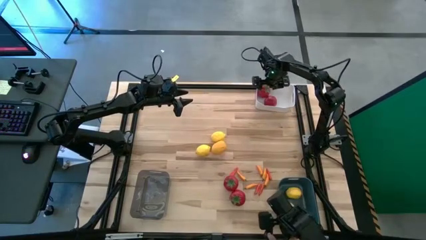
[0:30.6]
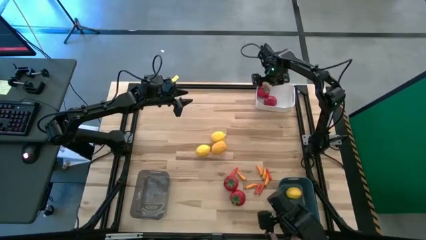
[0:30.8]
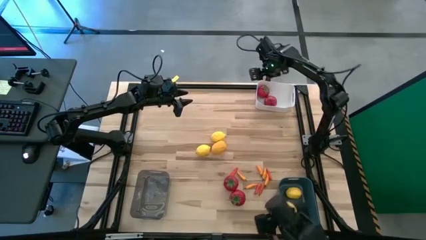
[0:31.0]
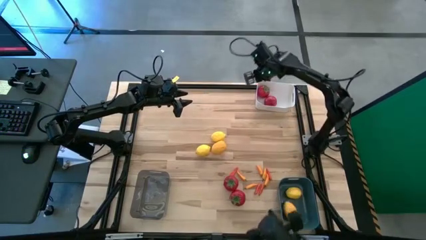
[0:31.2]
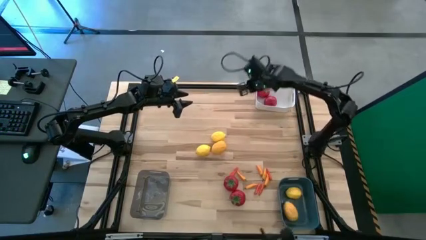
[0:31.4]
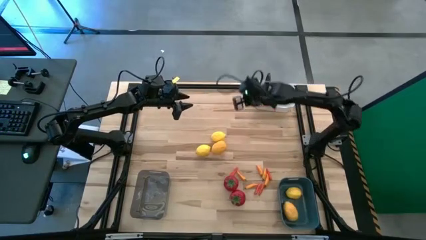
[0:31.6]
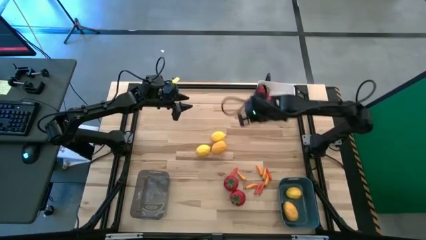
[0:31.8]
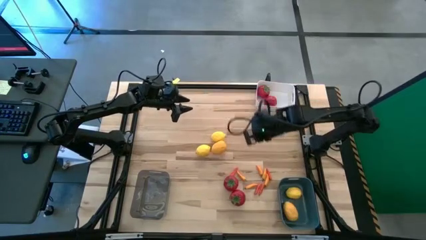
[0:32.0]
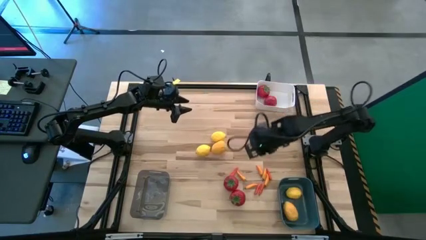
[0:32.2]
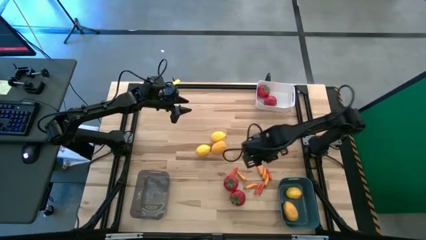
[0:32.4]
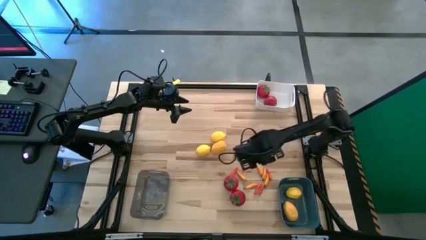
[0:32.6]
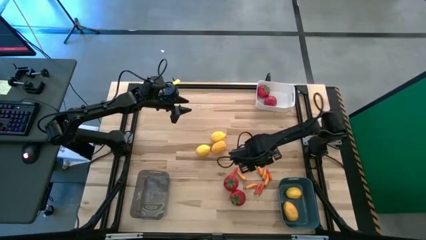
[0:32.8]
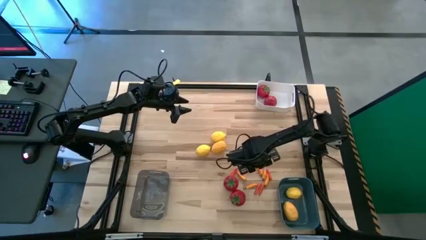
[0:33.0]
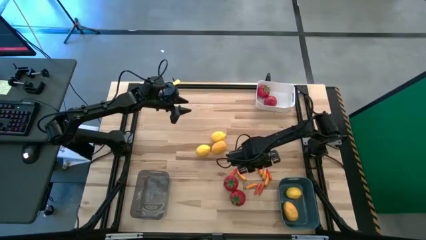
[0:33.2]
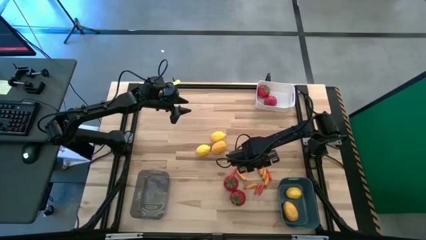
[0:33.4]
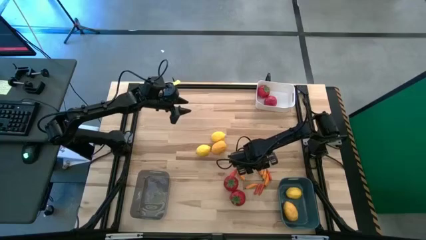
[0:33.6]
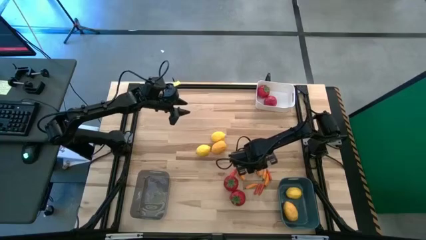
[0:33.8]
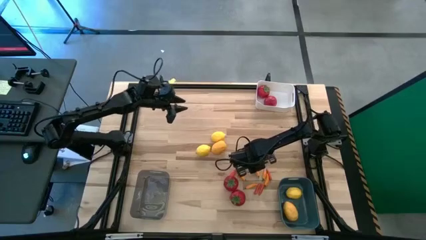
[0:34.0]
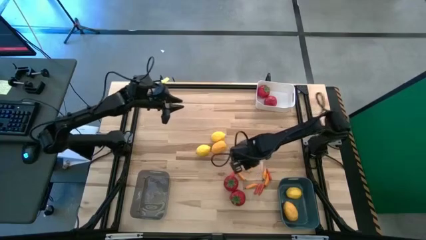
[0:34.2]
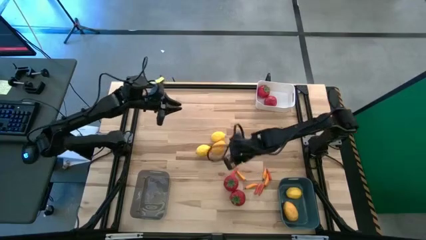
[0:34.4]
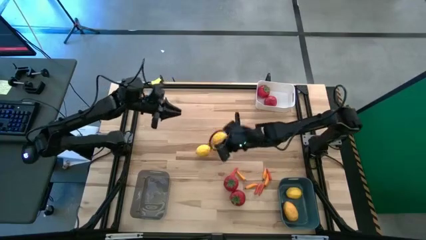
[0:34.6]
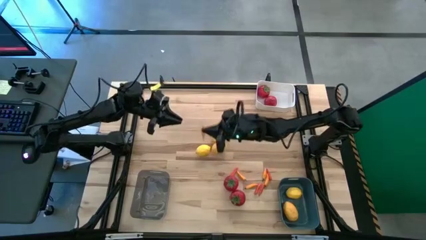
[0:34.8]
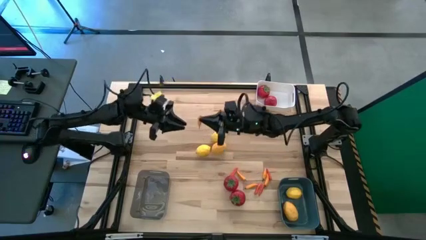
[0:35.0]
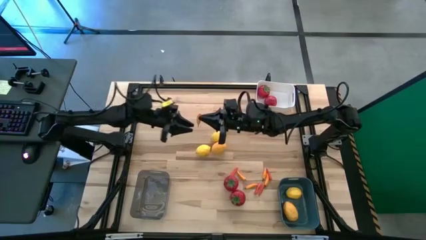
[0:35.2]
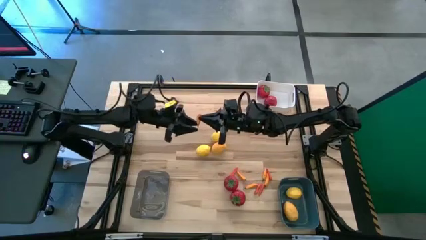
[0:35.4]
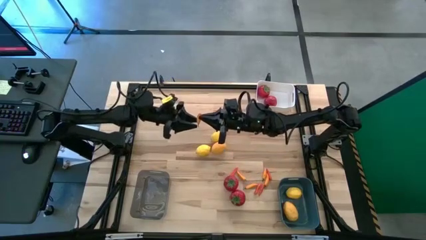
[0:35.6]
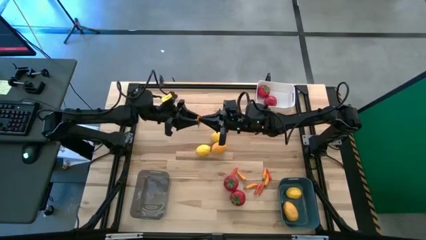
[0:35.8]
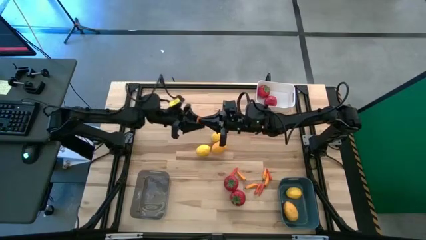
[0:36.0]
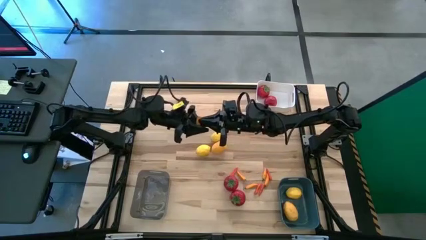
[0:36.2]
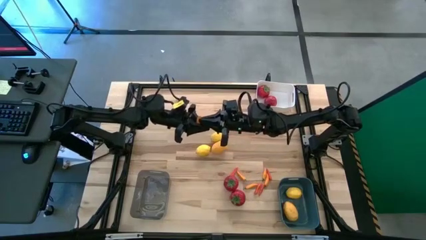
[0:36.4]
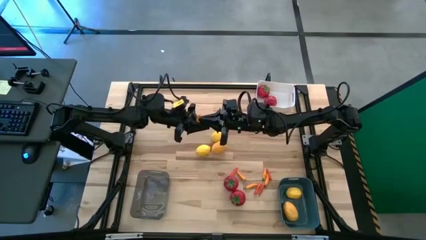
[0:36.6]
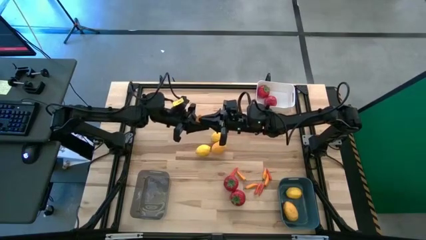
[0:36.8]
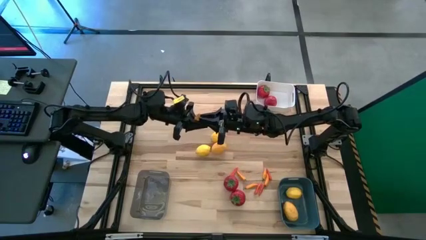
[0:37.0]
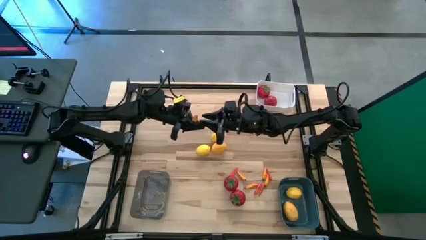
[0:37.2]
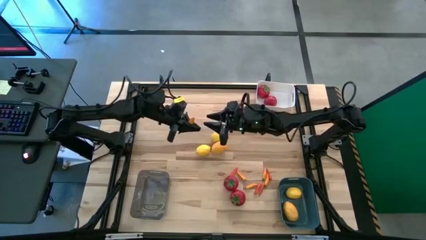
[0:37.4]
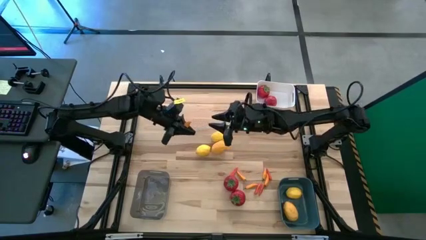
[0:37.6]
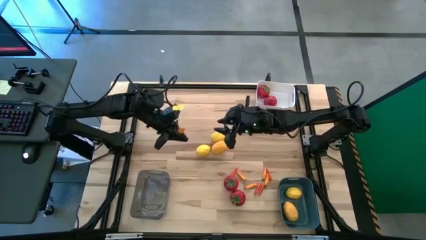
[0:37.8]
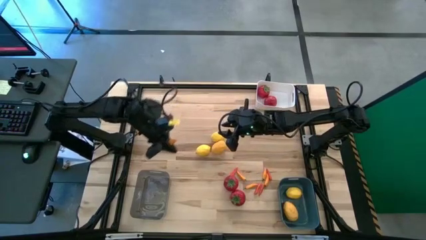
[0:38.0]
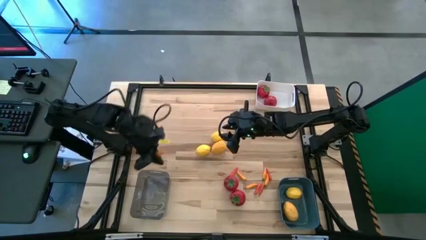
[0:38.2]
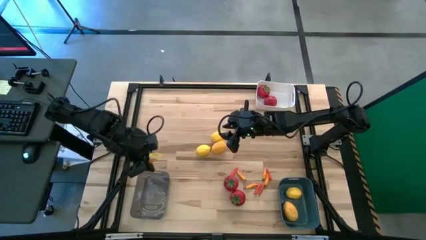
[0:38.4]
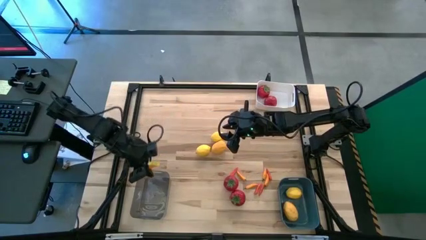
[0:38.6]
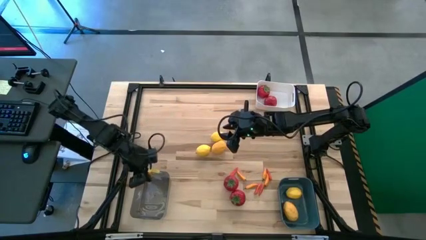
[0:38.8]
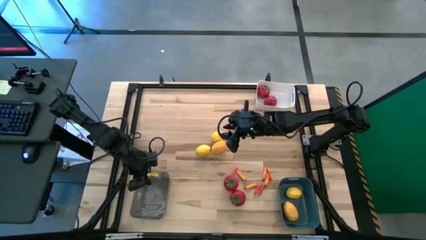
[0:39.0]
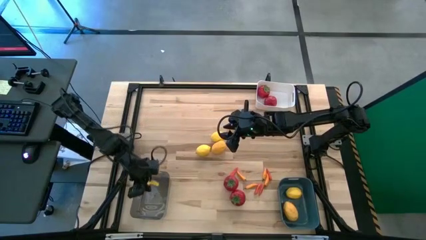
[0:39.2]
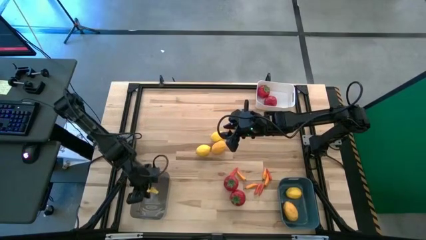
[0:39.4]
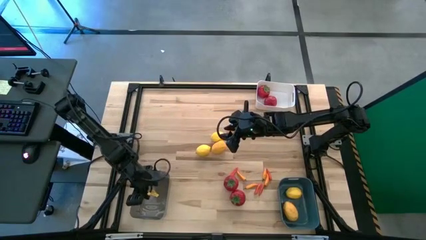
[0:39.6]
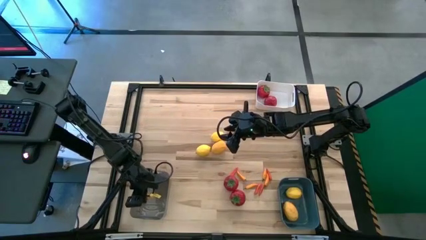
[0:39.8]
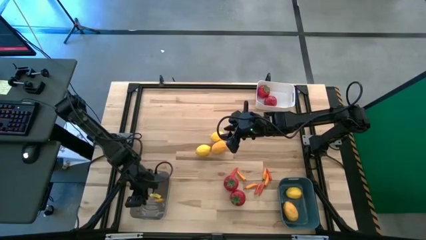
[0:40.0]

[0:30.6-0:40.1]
Task: Sort produce into baskets
Put the yellow chili pepper into black bin

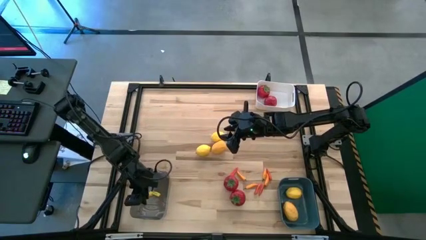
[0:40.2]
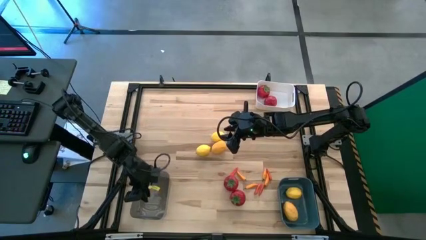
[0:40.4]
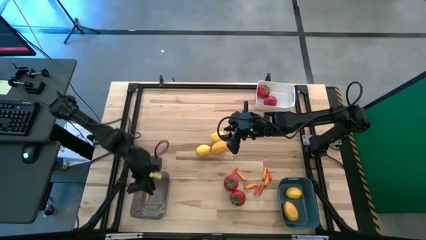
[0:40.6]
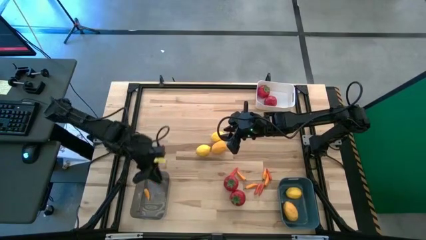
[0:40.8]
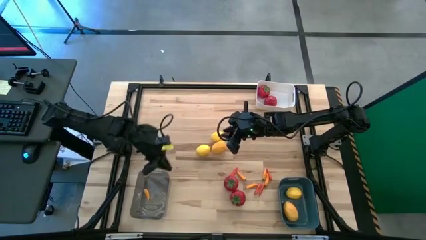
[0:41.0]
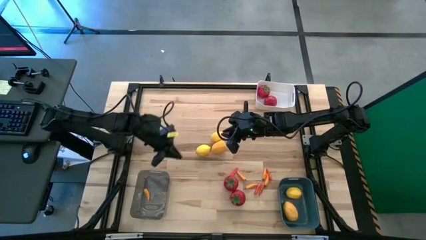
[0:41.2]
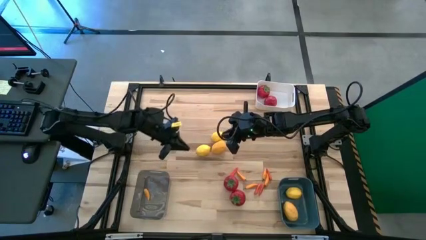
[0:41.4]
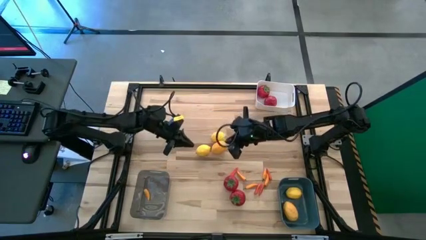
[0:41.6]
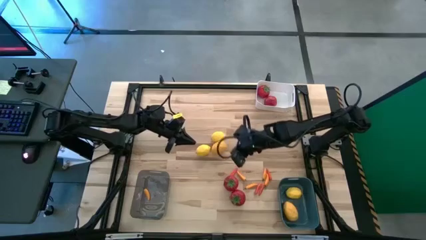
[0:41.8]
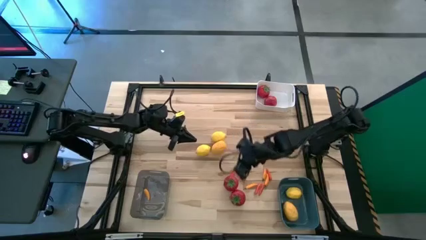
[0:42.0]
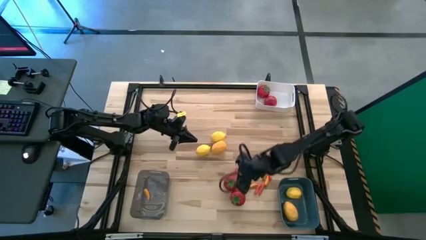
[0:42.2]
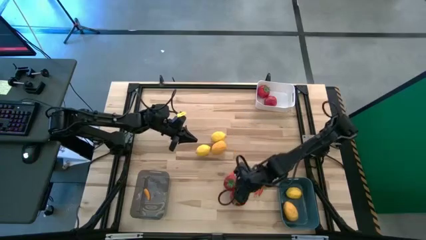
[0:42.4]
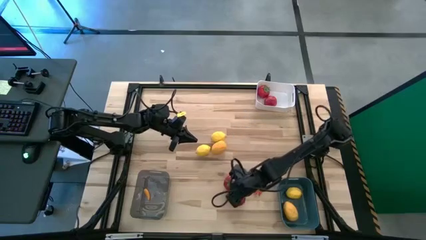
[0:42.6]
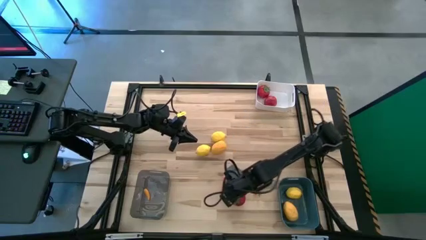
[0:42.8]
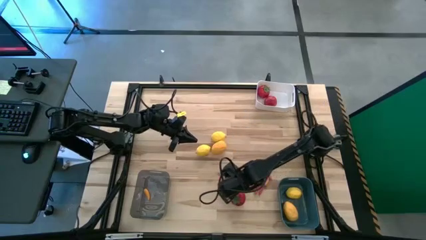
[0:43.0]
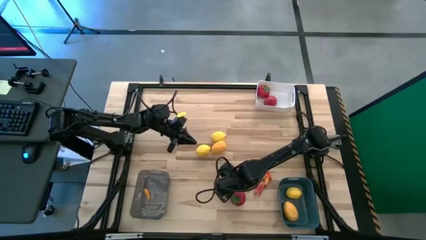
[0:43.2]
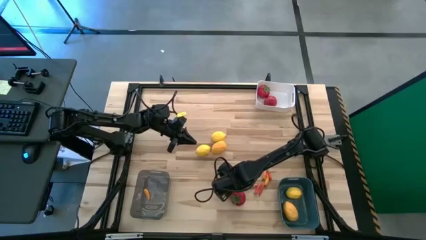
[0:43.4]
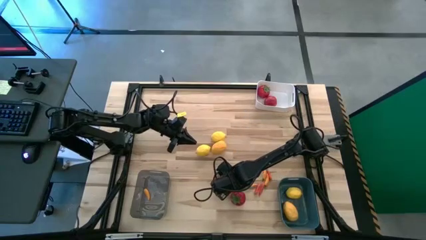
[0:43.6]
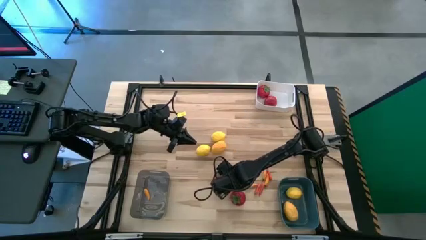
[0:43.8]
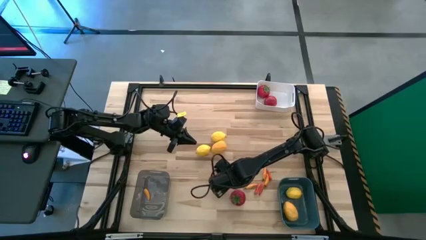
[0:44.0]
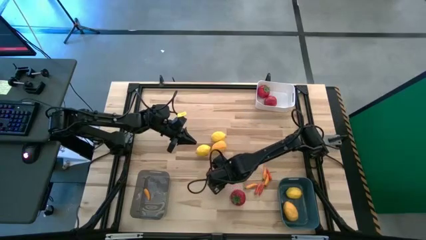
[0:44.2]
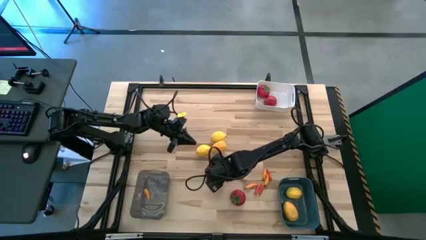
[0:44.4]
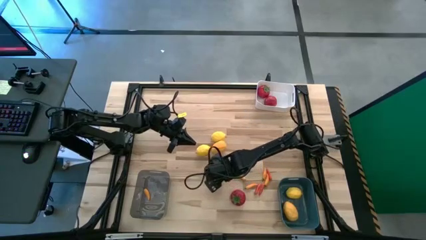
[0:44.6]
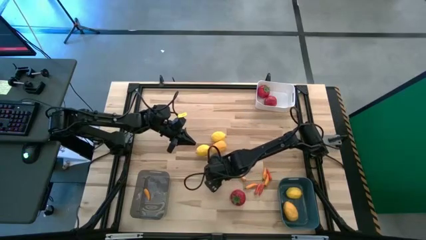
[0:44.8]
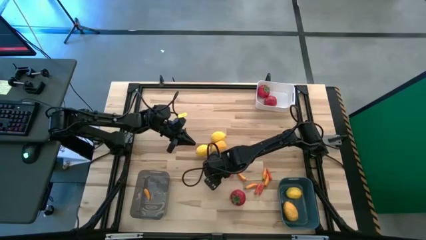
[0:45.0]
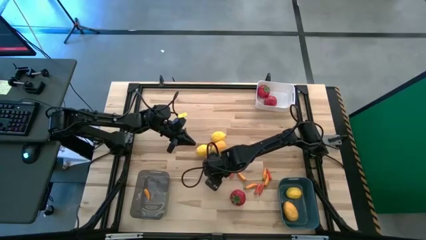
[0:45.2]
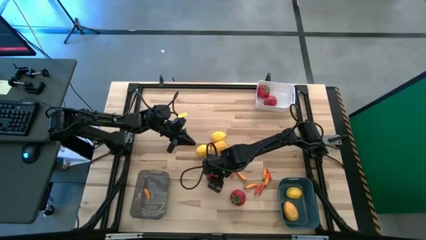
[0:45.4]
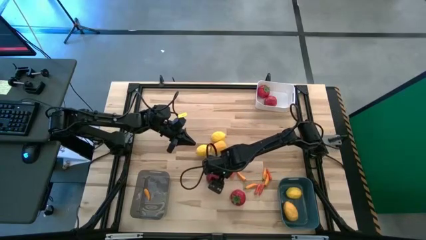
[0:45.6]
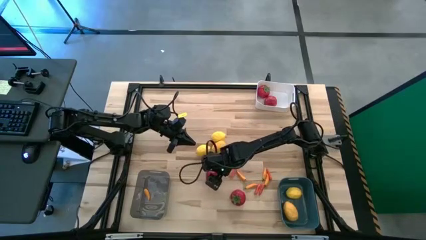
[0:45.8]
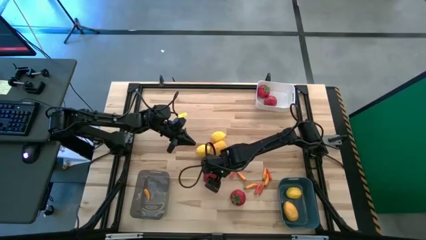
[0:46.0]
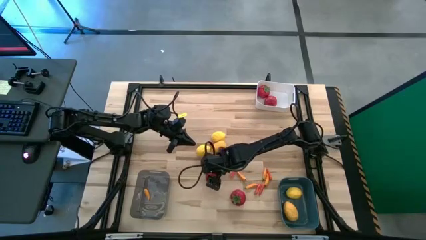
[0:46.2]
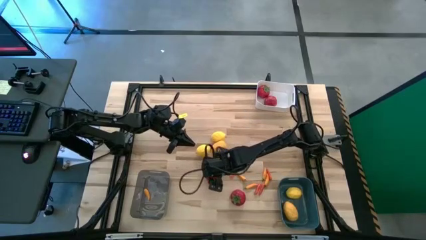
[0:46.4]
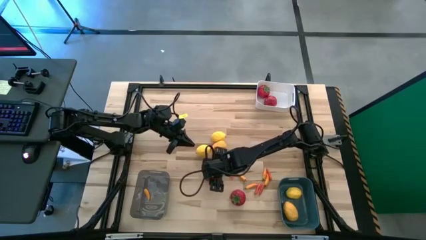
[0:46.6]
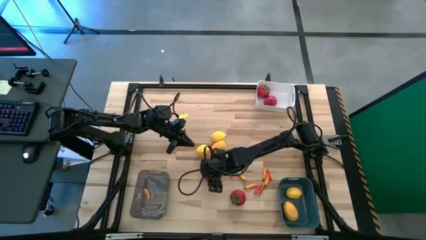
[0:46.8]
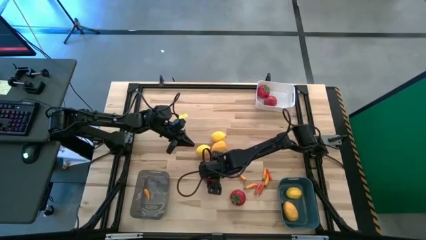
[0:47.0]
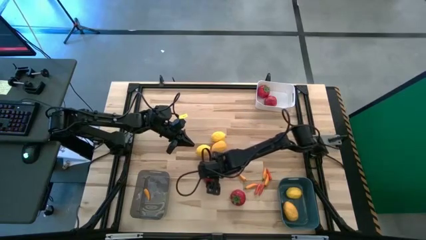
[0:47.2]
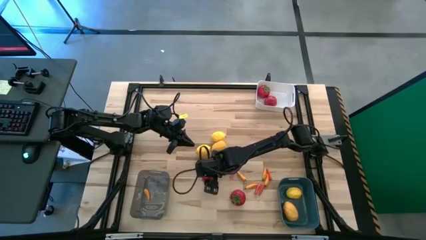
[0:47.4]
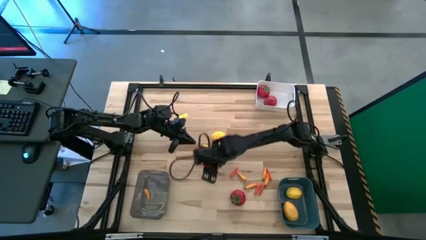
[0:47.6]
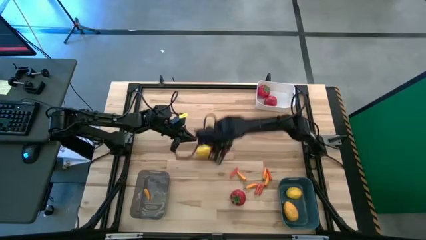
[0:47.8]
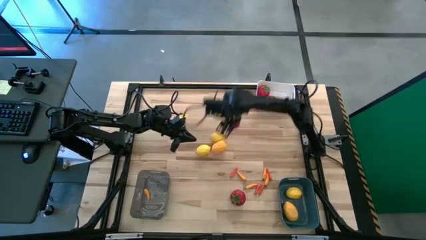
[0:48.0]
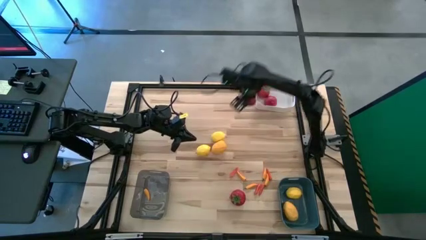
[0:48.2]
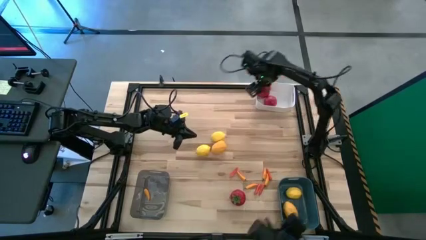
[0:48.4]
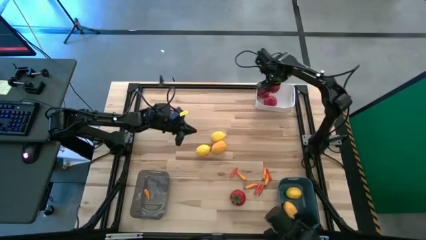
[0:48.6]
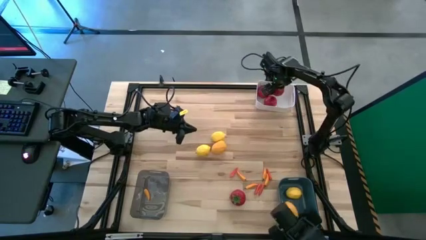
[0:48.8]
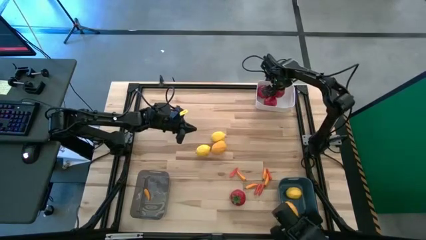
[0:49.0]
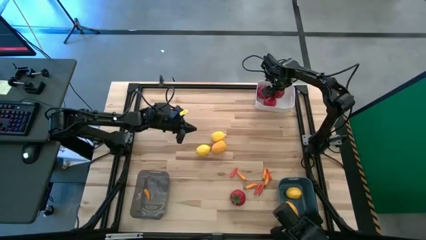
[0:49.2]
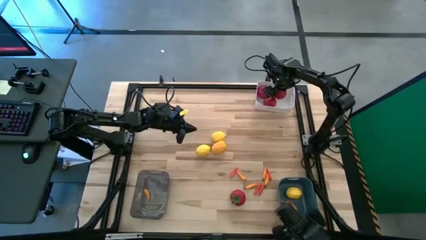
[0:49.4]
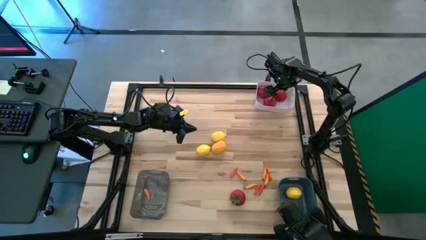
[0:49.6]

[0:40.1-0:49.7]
Put the tomato into the white bin
